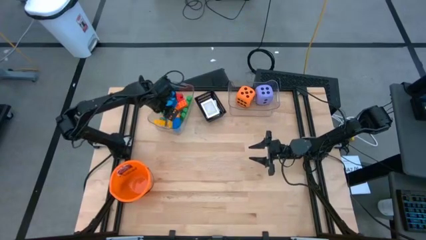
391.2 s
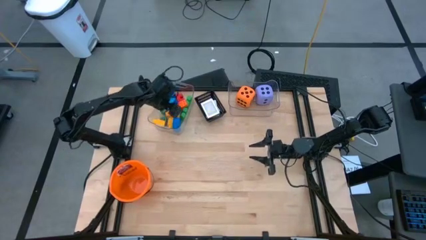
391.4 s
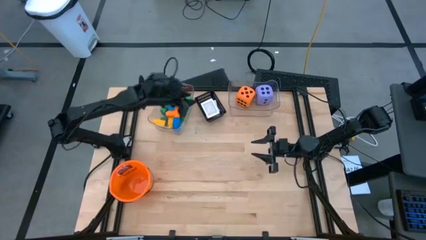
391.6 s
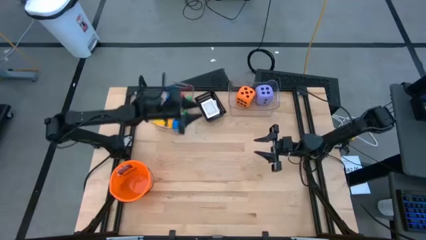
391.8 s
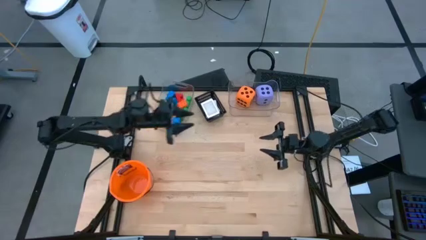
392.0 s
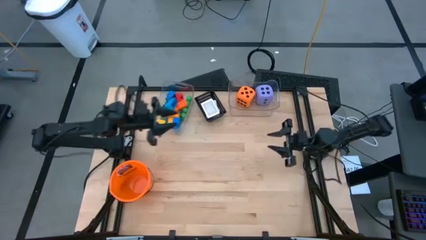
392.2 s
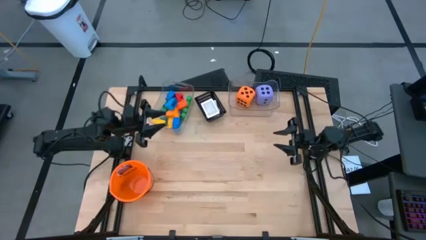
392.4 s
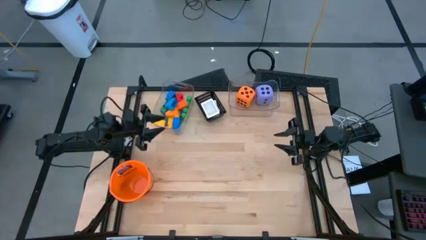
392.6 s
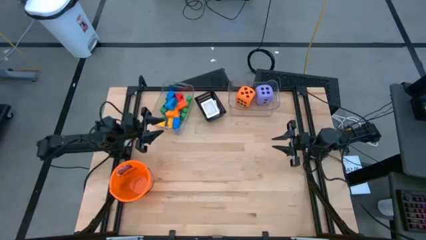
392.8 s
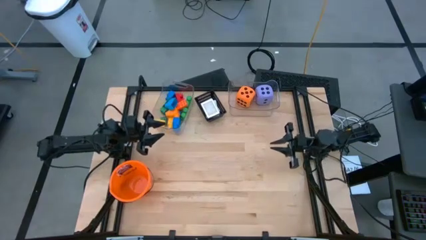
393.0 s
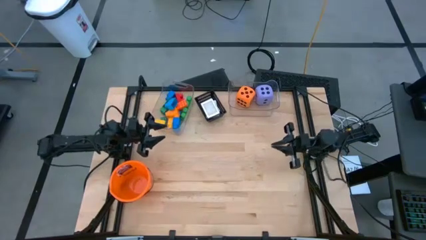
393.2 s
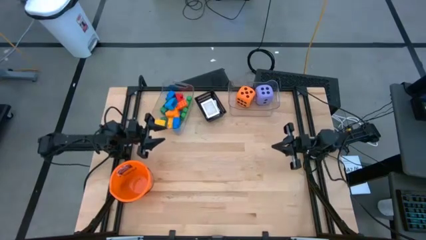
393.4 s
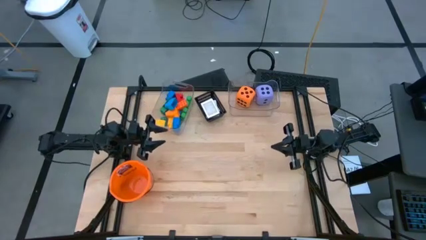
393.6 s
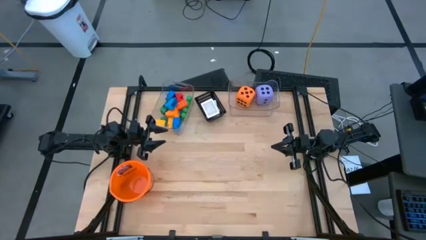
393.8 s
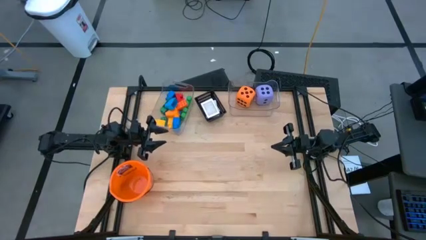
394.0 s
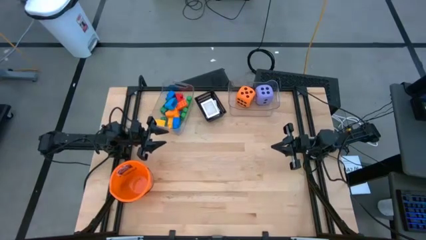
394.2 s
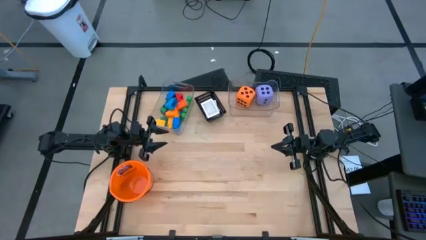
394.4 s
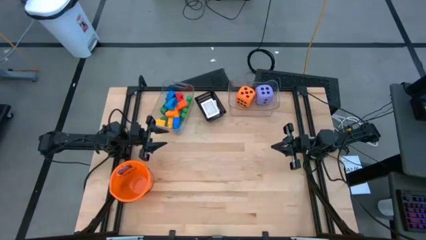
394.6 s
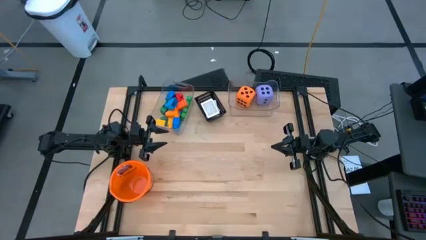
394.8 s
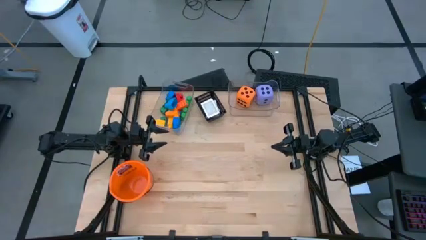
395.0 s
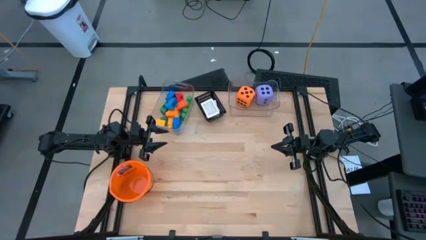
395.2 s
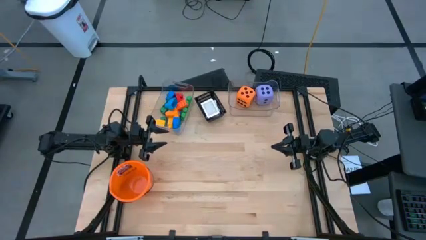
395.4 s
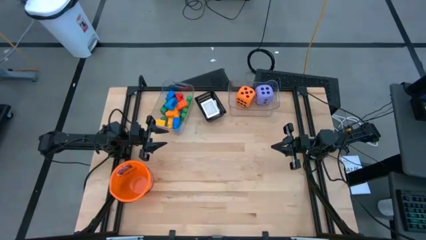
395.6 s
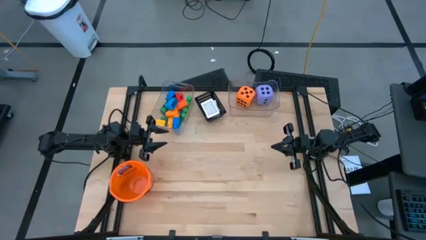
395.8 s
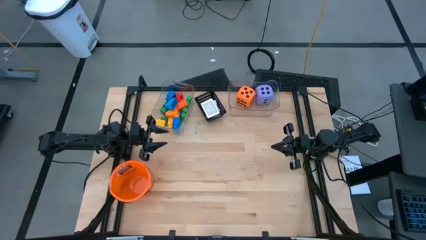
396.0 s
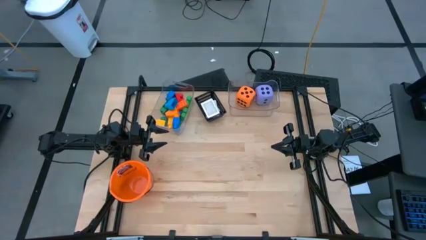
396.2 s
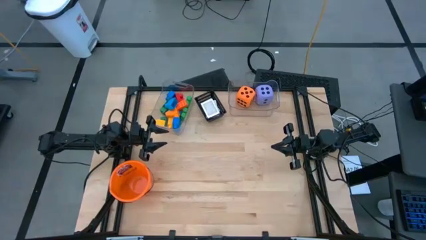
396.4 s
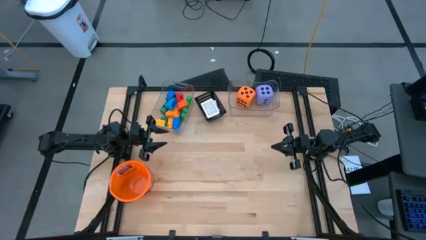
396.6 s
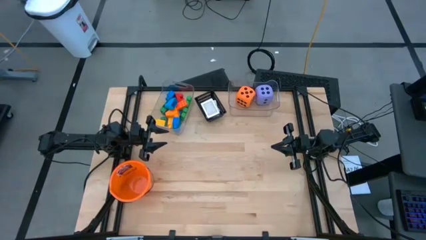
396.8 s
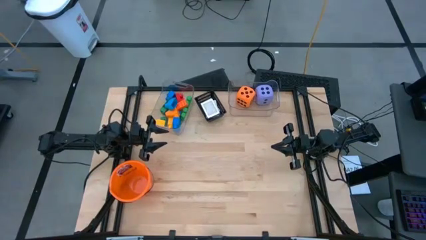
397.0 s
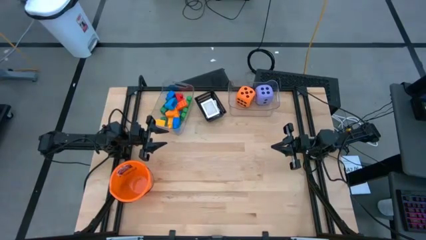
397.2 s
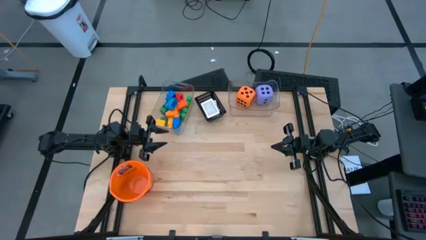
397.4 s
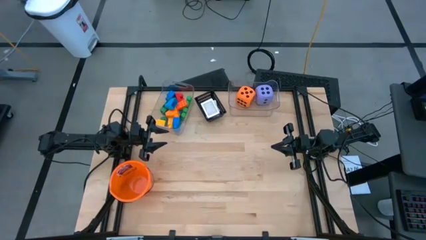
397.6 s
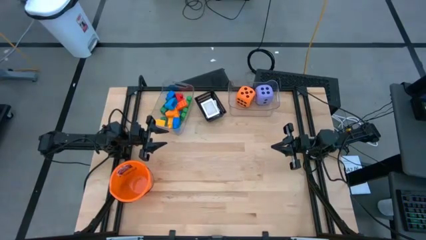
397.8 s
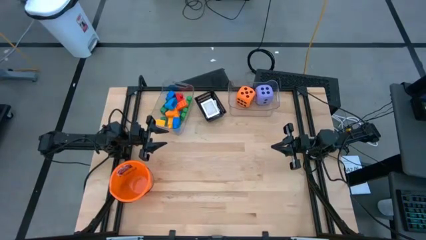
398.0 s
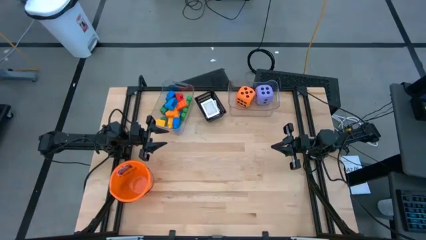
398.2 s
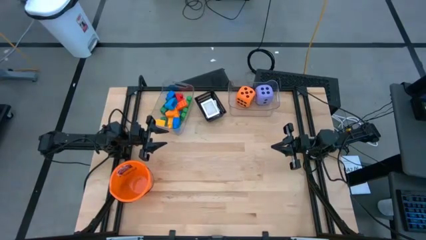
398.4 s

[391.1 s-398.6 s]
Task: Pick & Place Toys
Return to Home Position

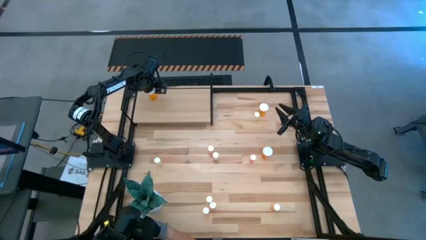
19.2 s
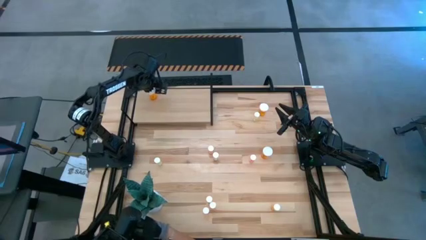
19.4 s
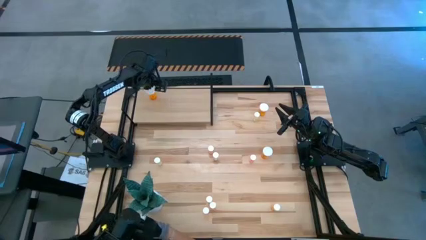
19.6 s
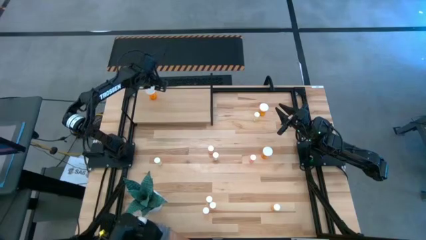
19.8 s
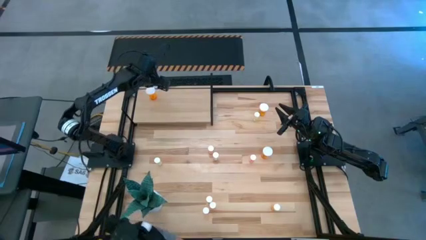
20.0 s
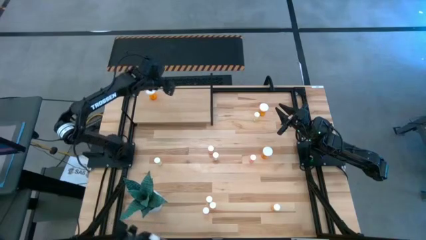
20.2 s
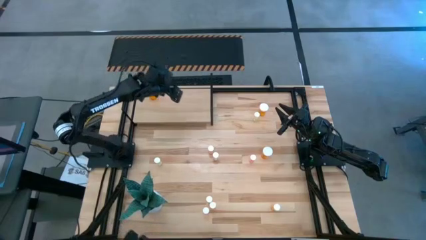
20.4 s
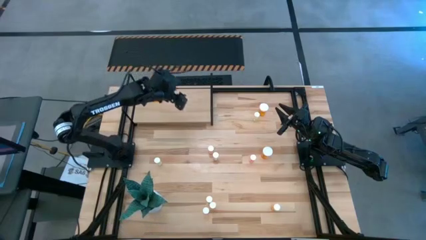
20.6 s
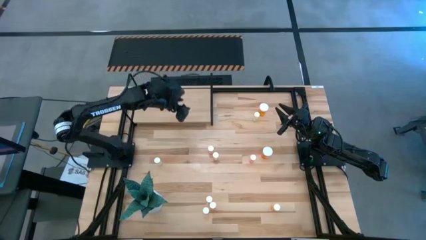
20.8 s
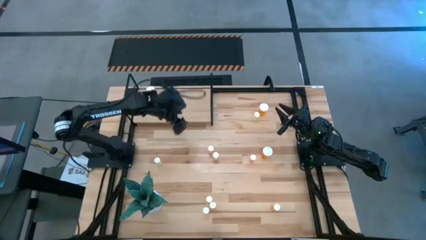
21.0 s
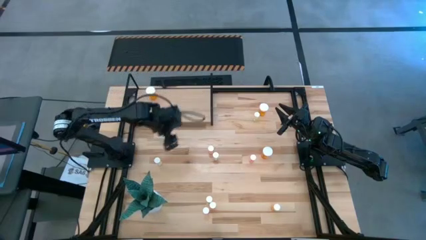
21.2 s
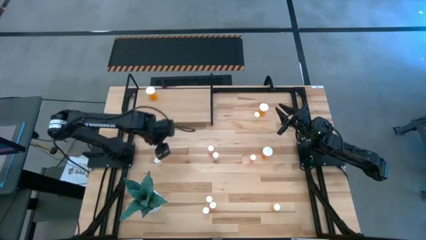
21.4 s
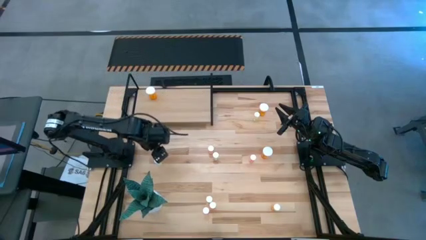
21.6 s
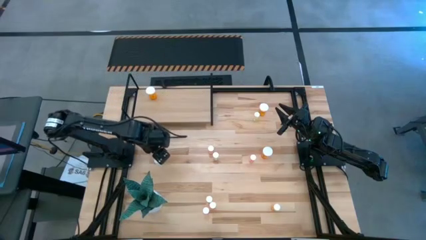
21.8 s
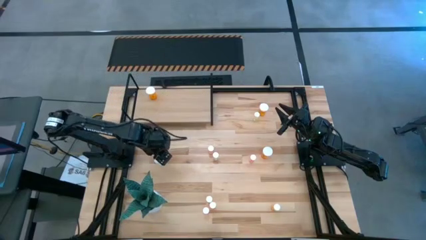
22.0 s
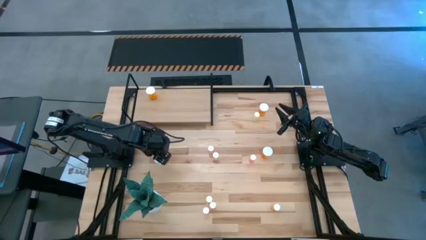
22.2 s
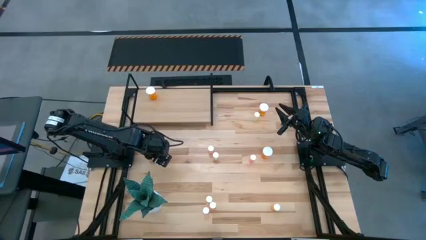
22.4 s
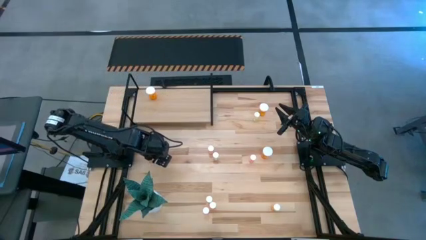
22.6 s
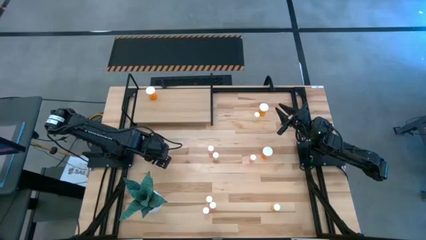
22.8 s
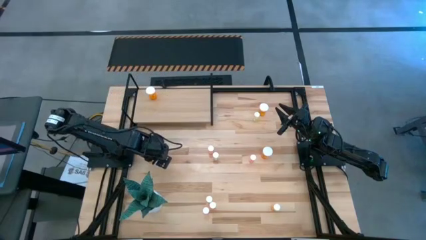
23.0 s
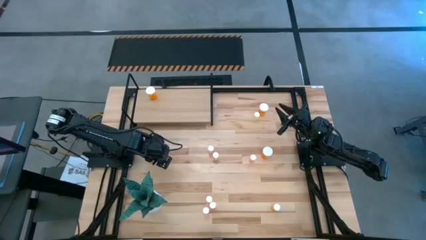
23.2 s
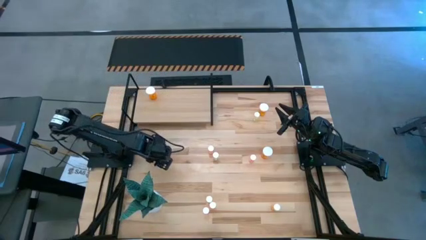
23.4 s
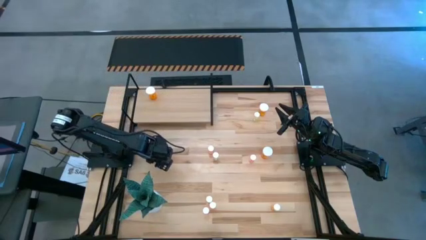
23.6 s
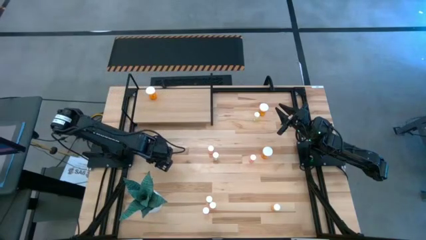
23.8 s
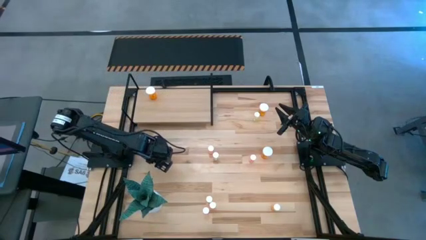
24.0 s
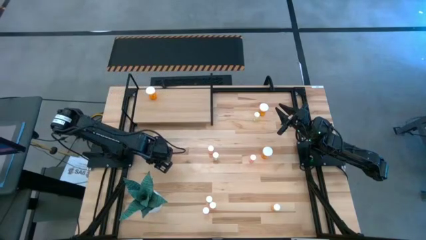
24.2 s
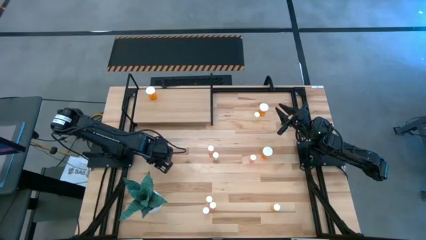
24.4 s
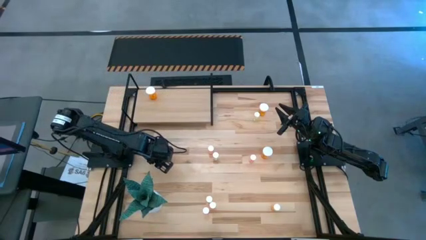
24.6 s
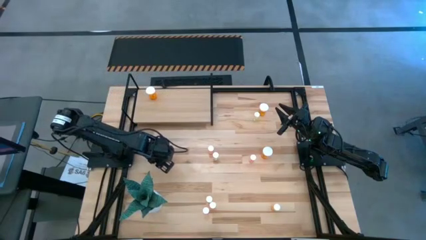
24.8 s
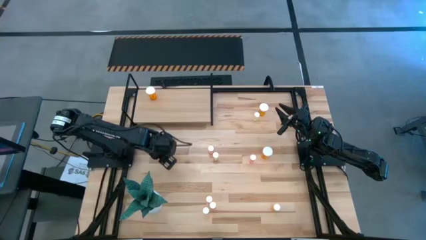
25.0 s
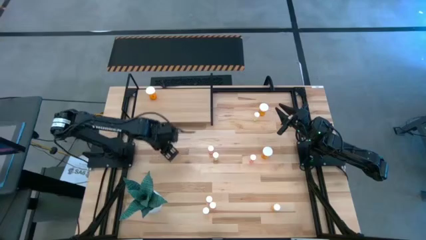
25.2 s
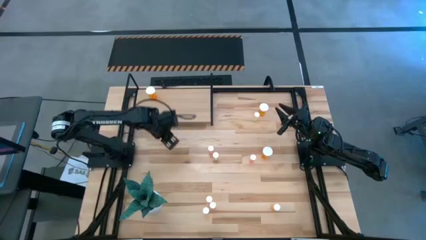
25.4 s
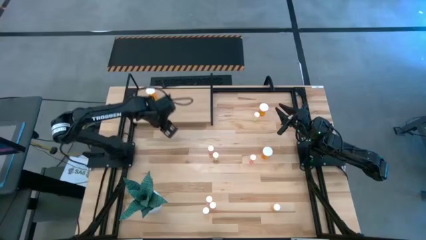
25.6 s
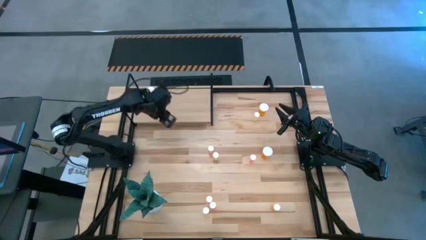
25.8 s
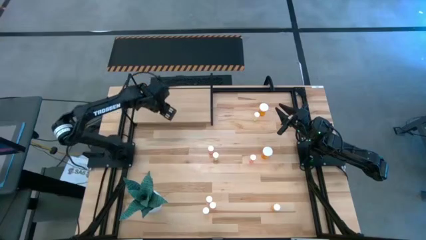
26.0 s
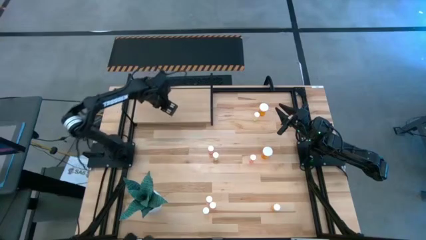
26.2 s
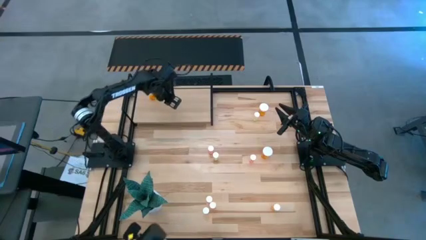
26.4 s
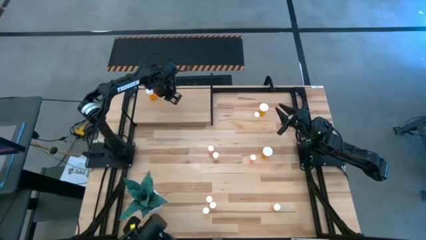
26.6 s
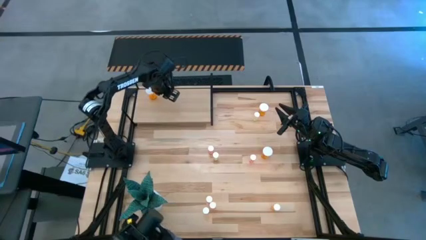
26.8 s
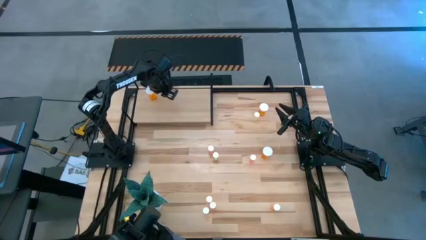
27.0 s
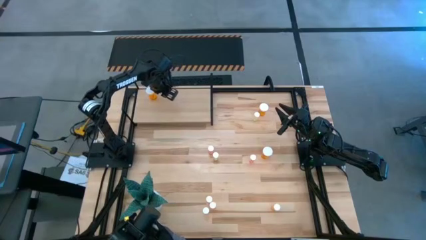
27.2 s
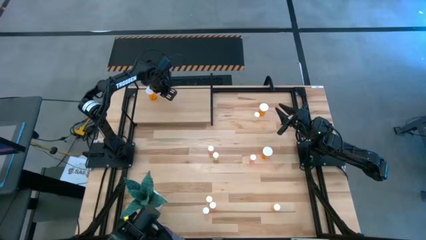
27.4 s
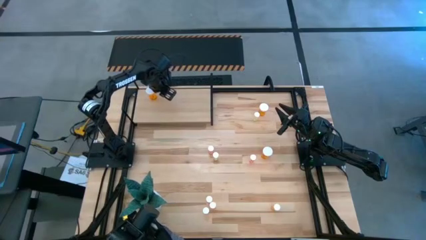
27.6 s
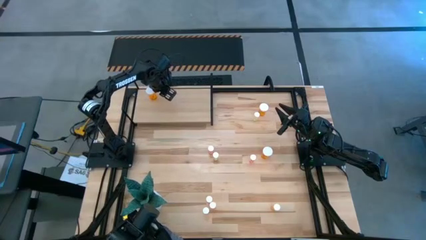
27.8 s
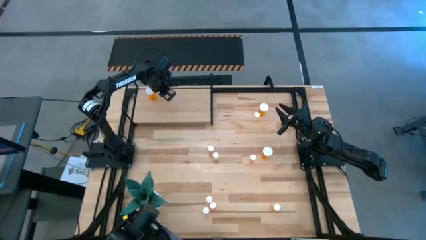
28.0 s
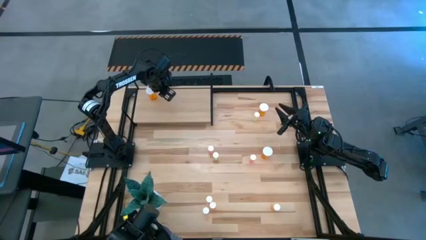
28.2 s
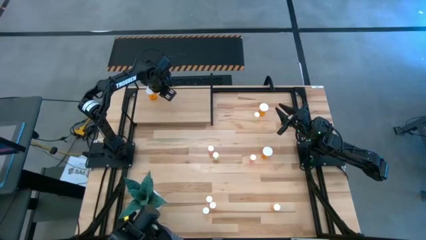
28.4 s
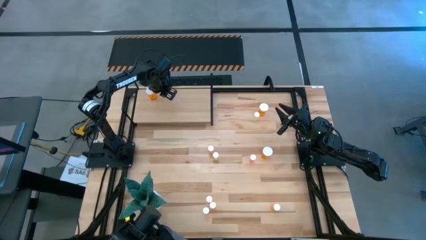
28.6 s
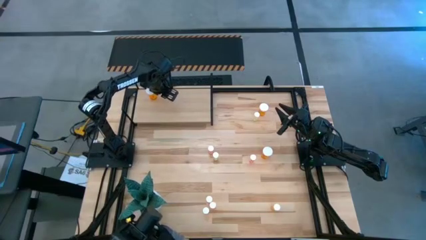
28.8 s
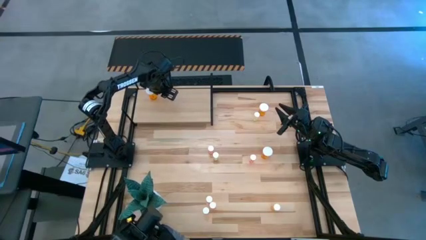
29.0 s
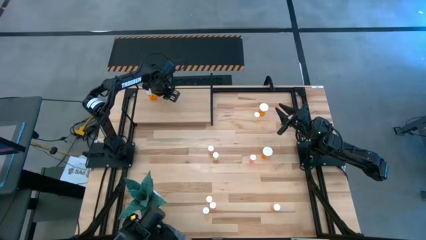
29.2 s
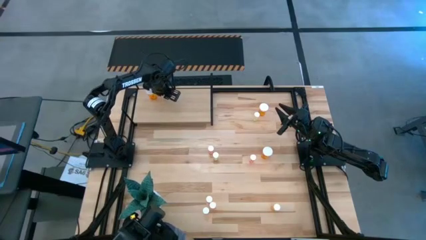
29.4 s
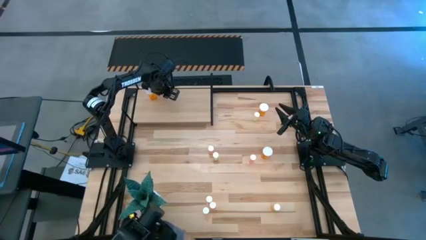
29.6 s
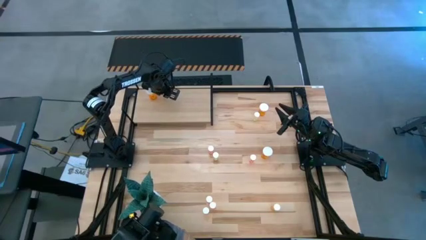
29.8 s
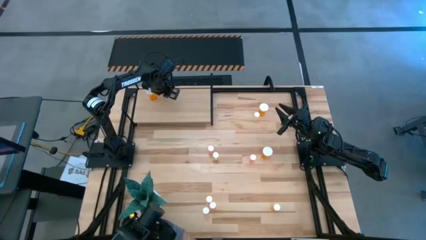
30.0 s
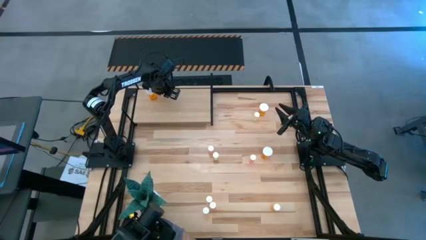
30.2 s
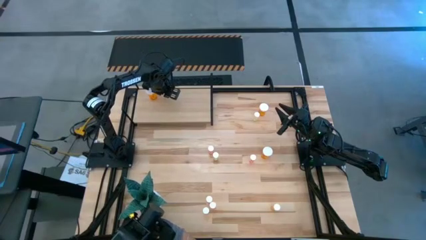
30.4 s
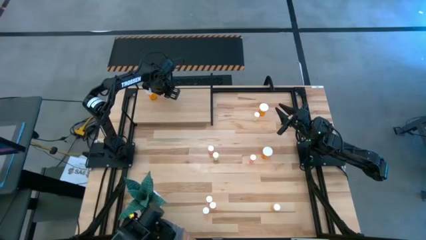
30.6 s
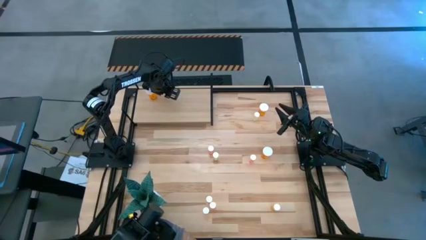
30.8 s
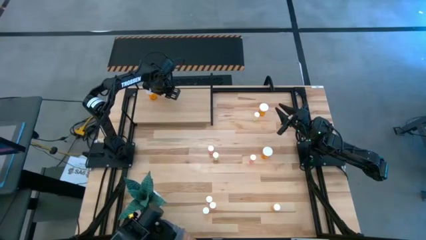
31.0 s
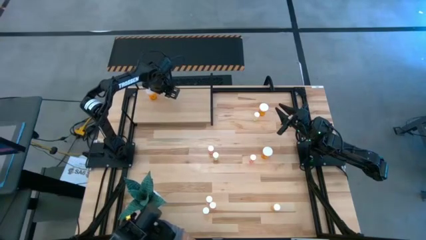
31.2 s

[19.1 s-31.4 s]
Task: Pick and place medicine bottles onto shelf by color
Put the left yellow pill bottle on the shelf
